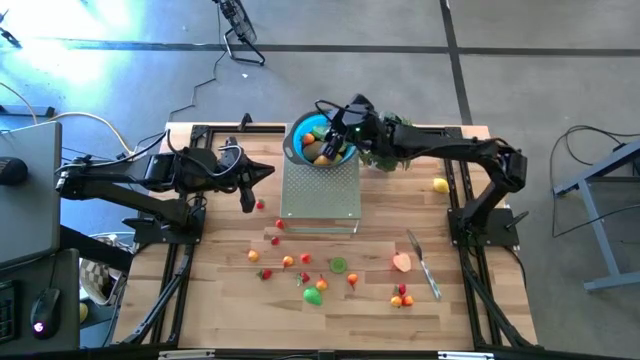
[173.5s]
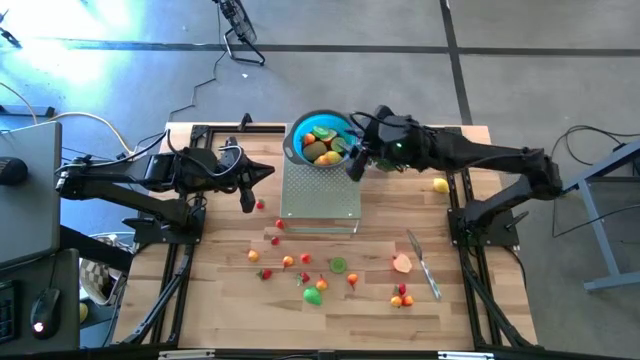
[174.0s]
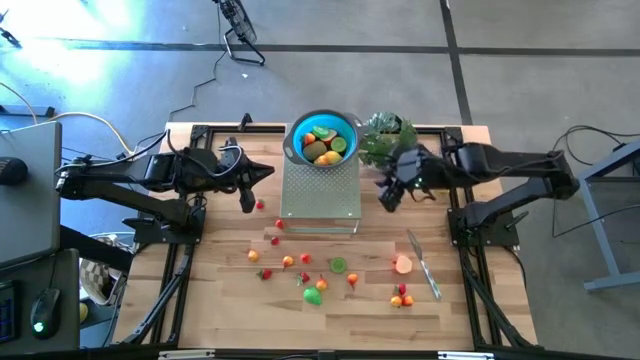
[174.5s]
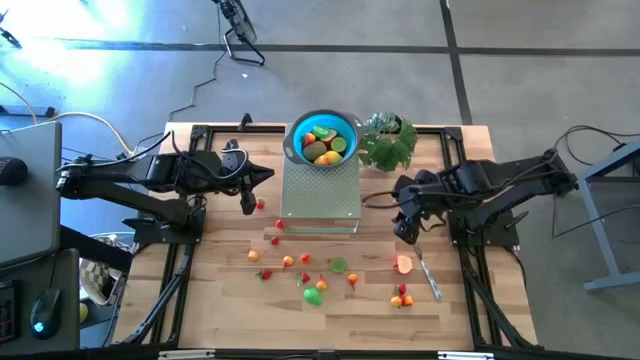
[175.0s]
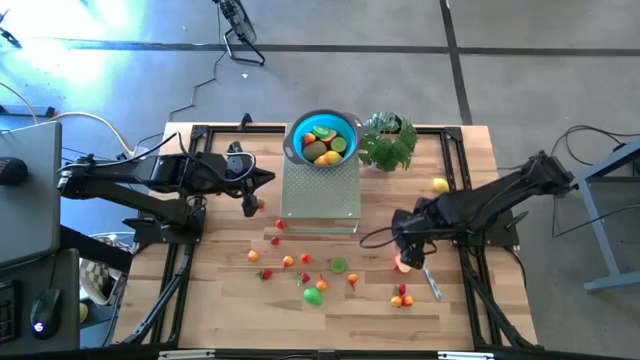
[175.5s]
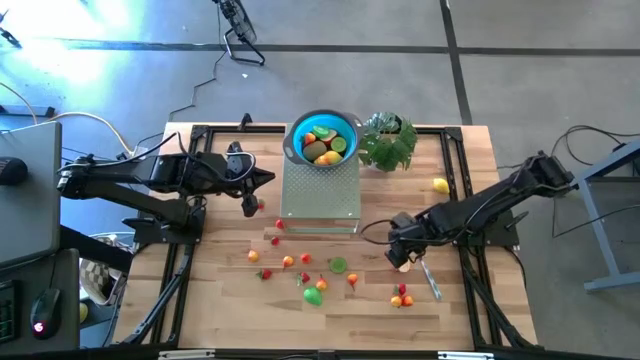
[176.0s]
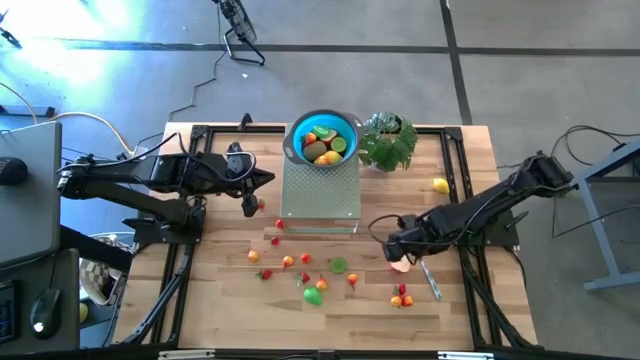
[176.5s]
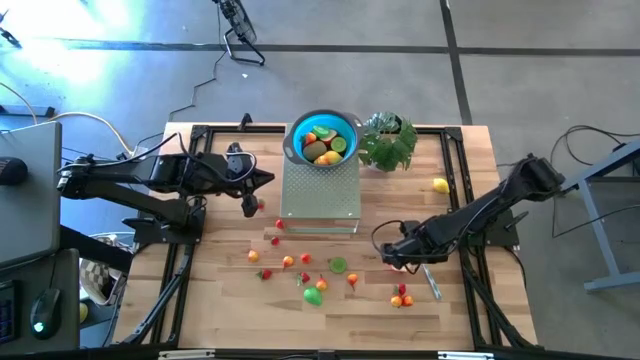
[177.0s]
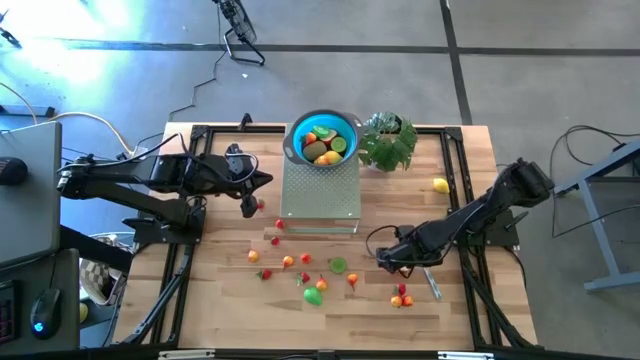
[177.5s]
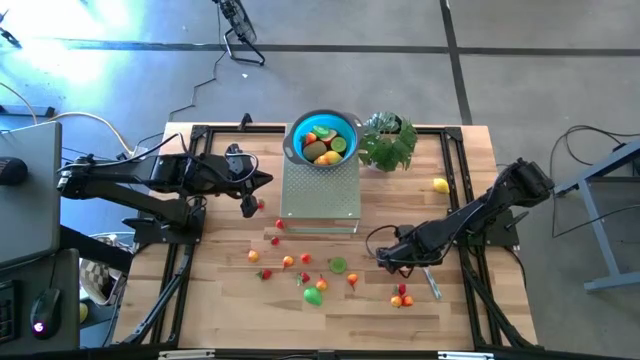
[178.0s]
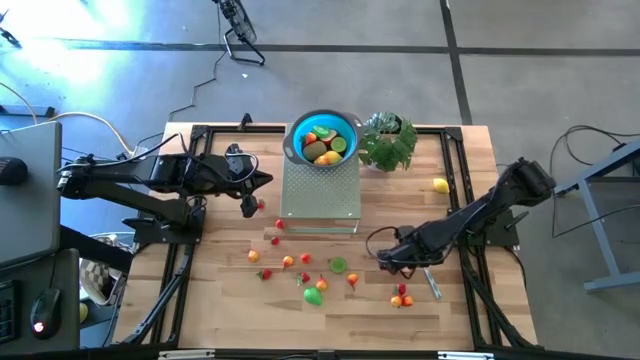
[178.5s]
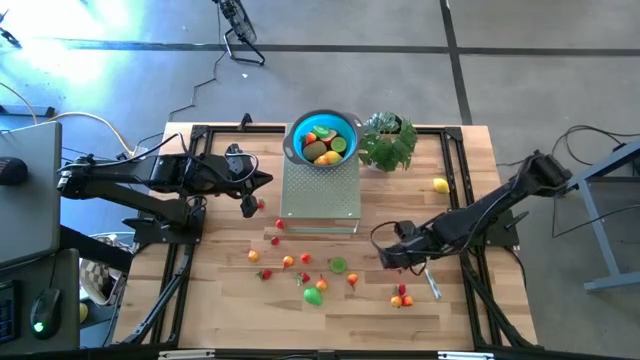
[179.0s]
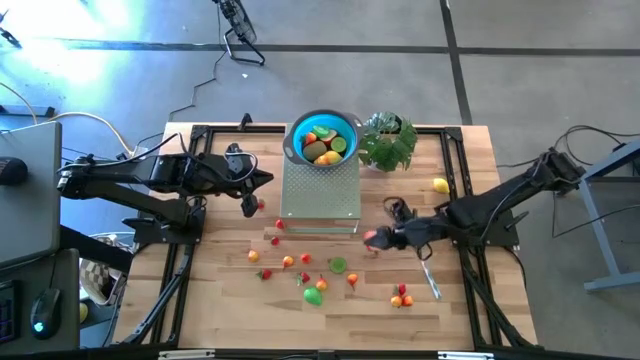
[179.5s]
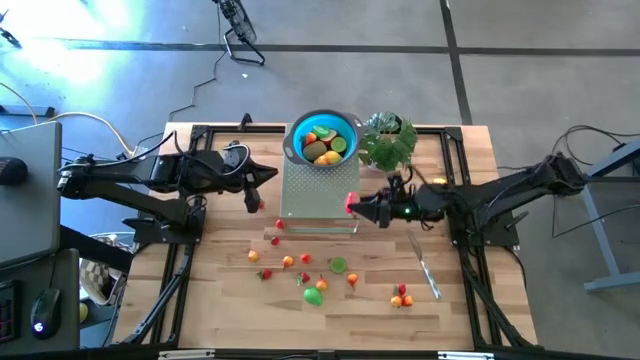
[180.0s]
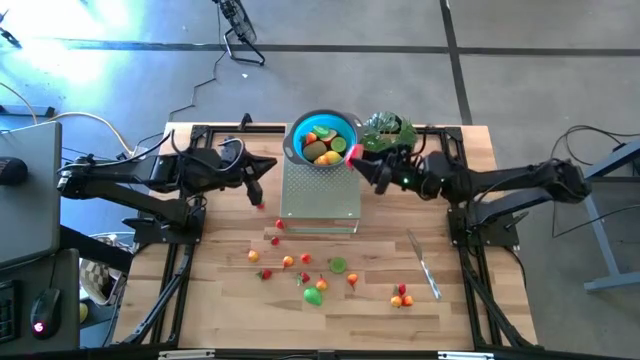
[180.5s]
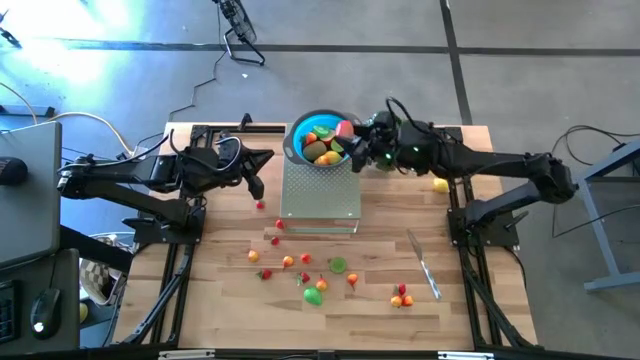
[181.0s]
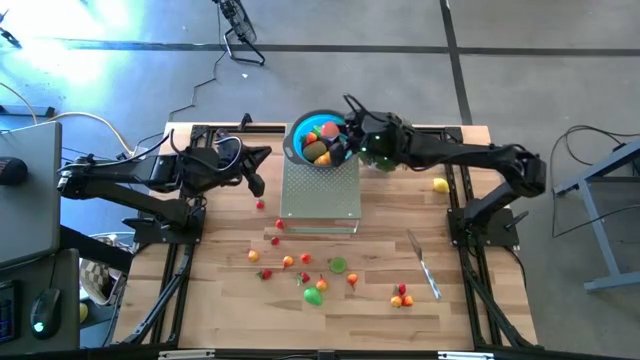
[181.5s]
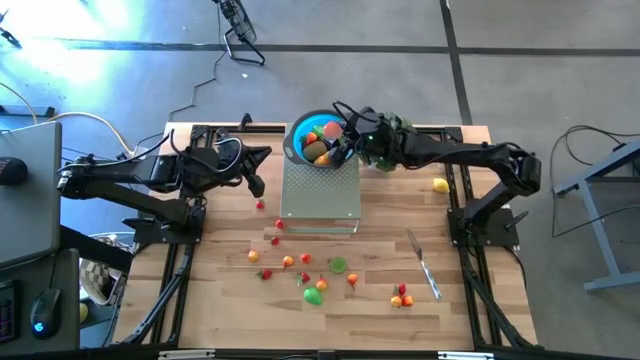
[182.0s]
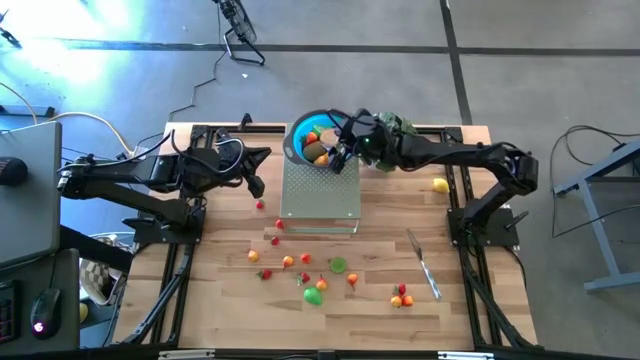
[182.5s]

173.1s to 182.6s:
Task: Pick & Place Fruit
Put the red apple in the blue bowl on the shelf

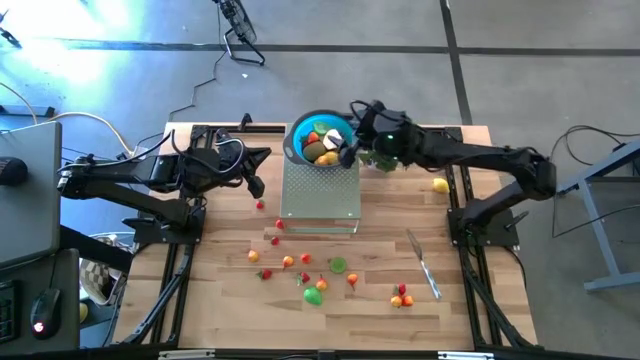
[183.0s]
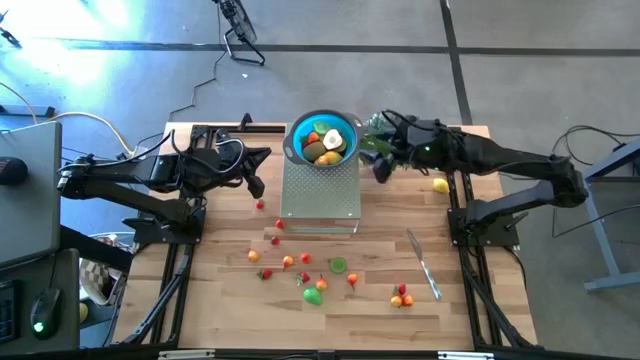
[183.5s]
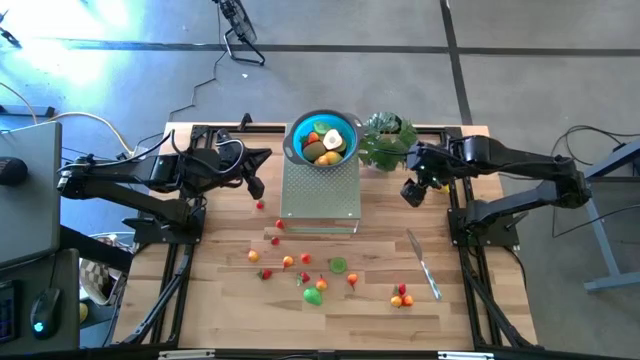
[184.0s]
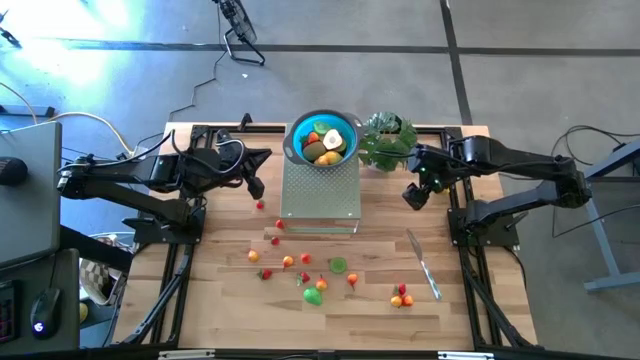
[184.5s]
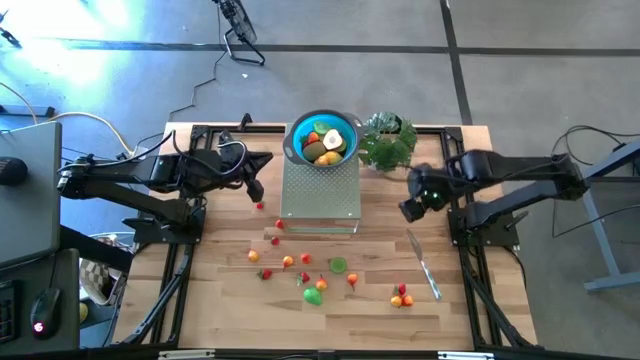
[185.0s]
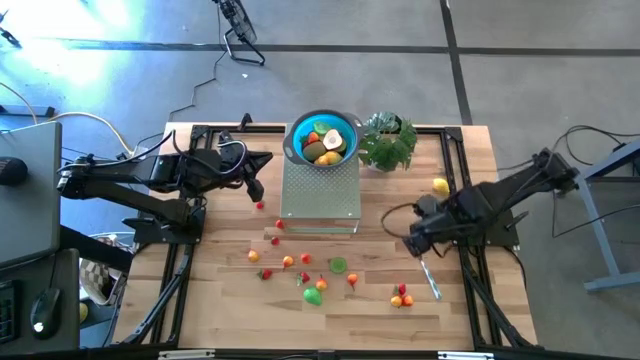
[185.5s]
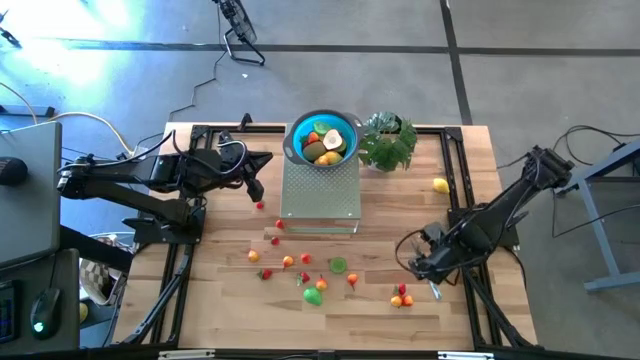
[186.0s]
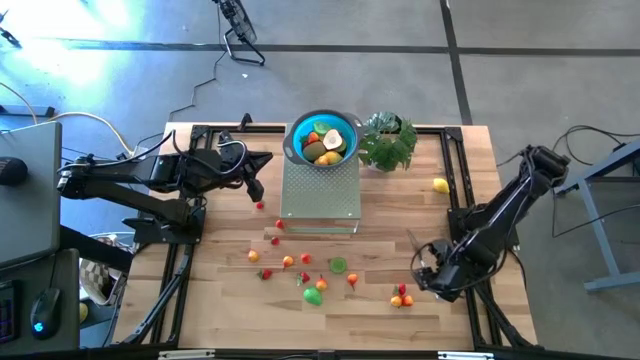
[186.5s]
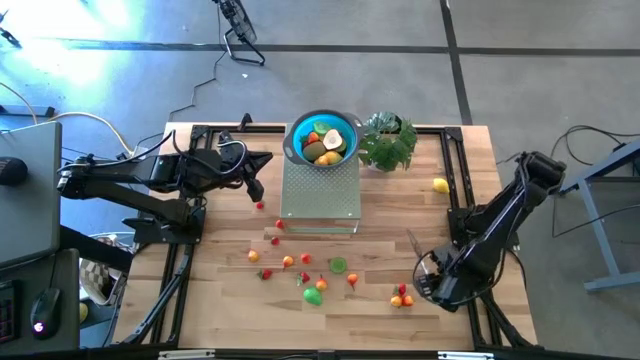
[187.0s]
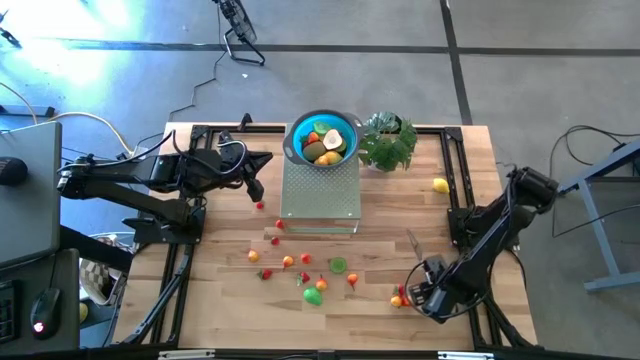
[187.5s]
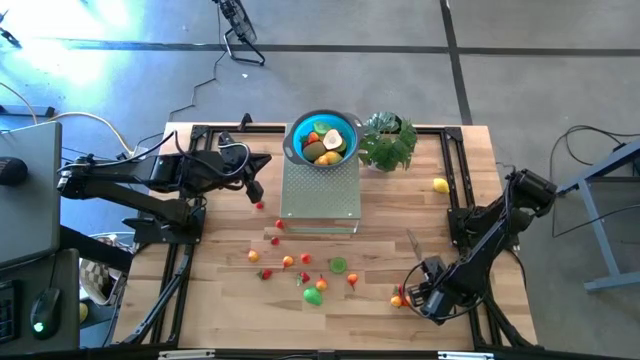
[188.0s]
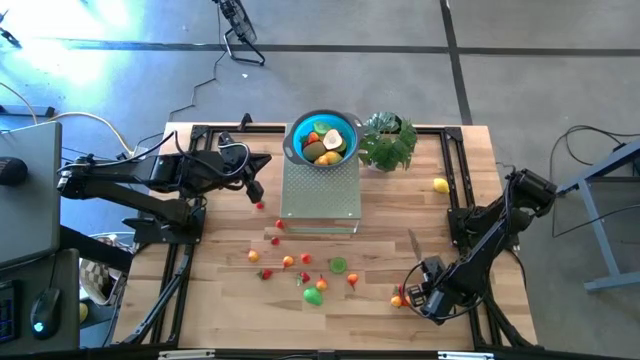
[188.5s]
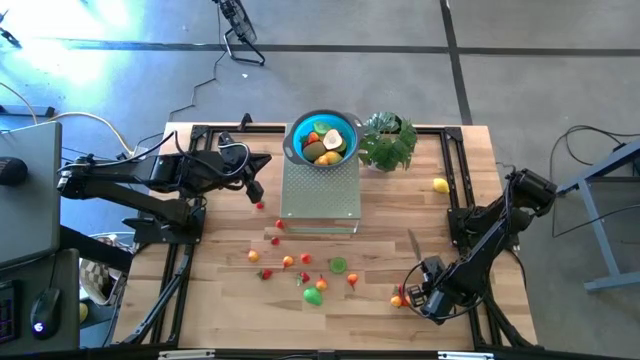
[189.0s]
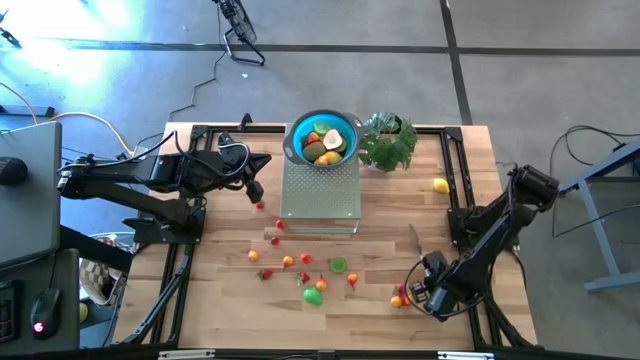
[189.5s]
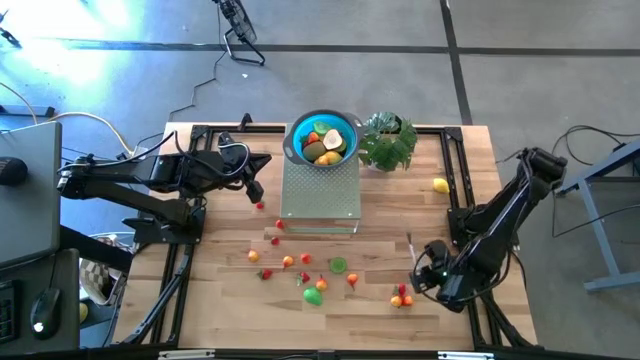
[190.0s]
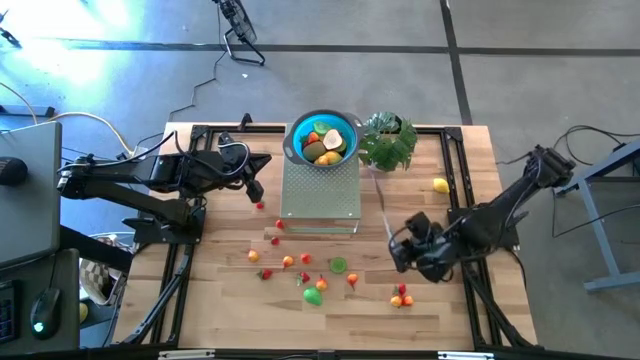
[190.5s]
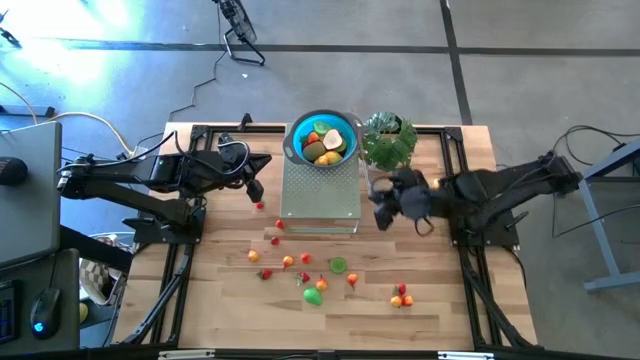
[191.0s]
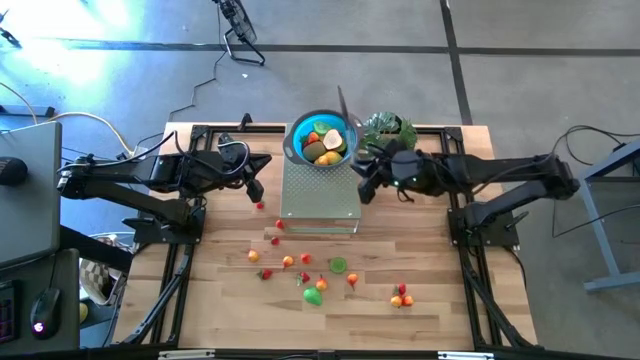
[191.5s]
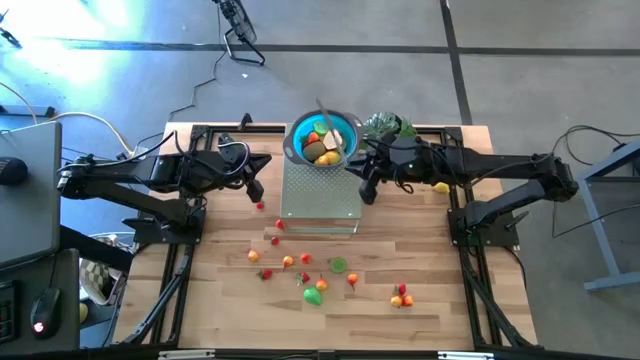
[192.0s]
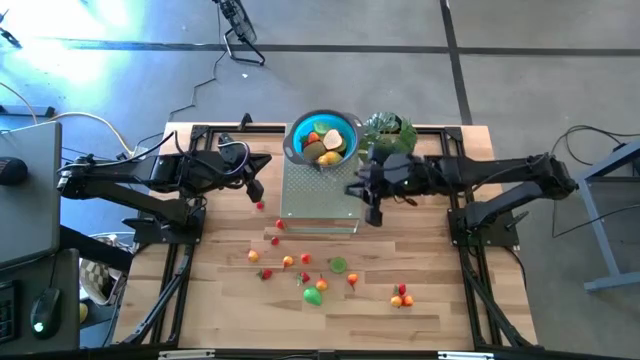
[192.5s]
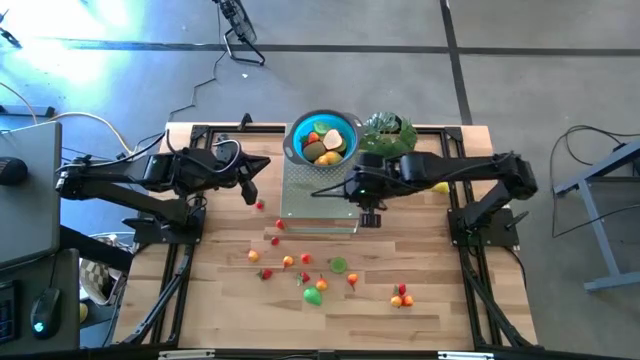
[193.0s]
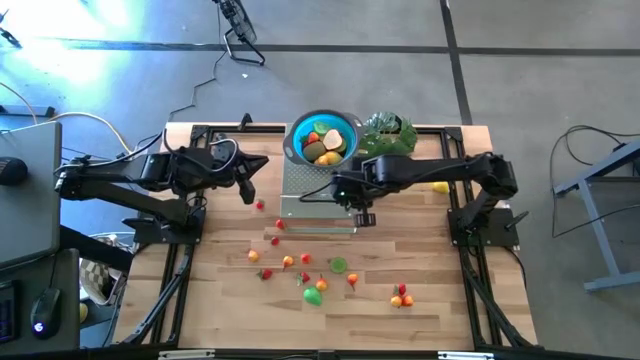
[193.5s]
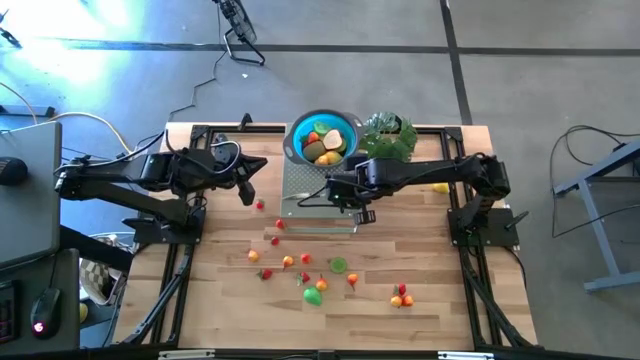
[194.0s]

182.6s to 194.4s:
Put the blue table knife on the shelf
